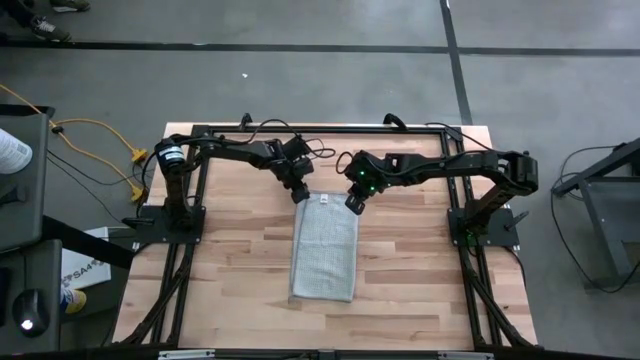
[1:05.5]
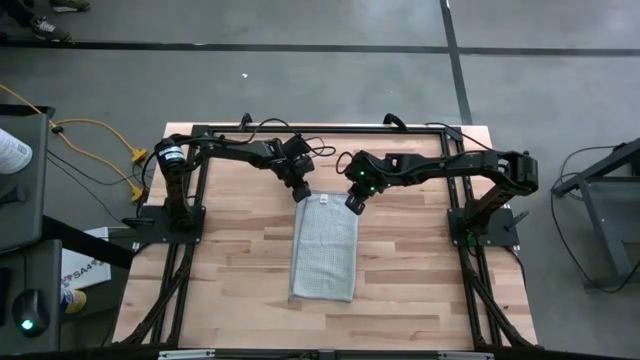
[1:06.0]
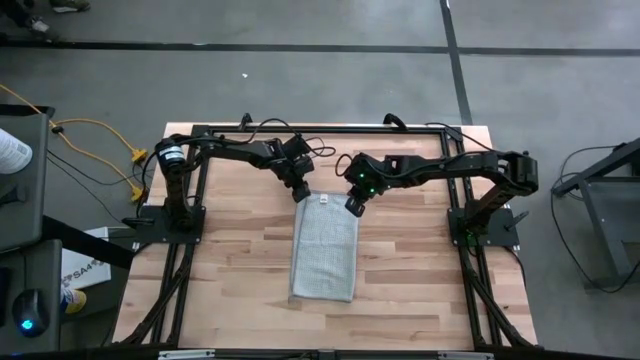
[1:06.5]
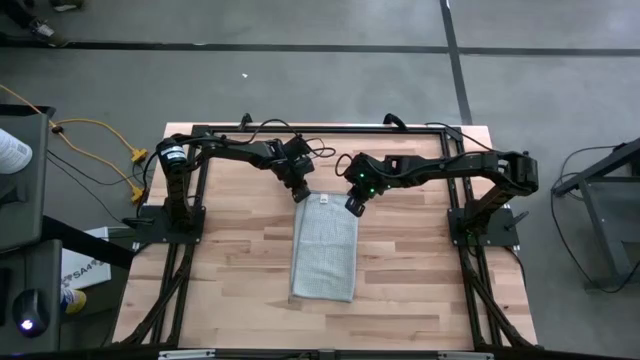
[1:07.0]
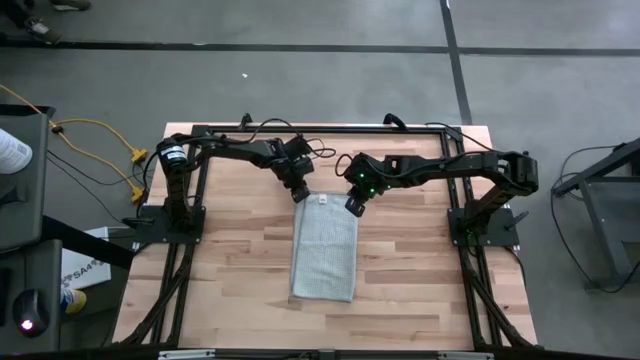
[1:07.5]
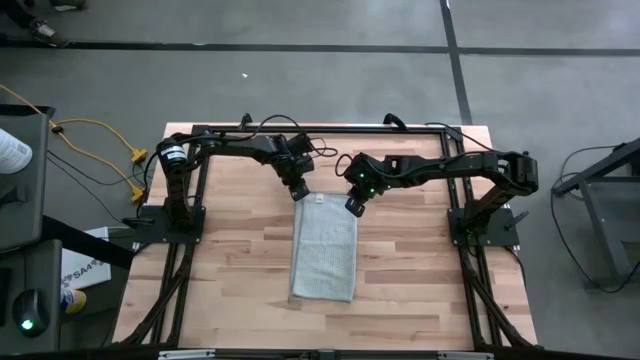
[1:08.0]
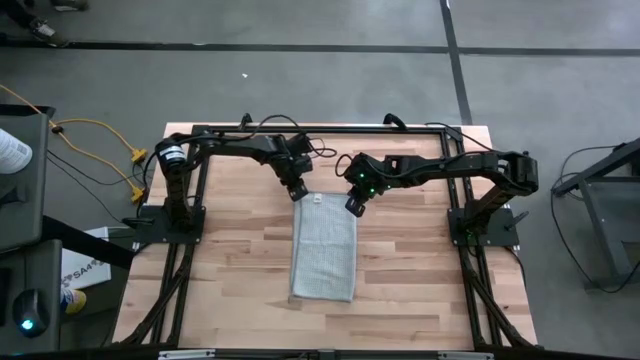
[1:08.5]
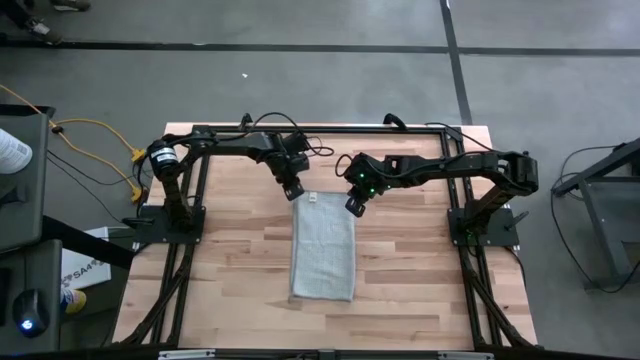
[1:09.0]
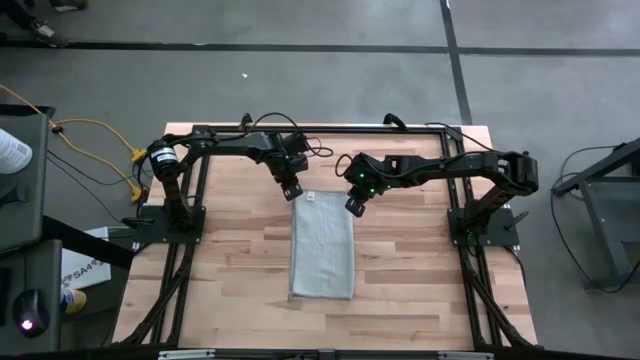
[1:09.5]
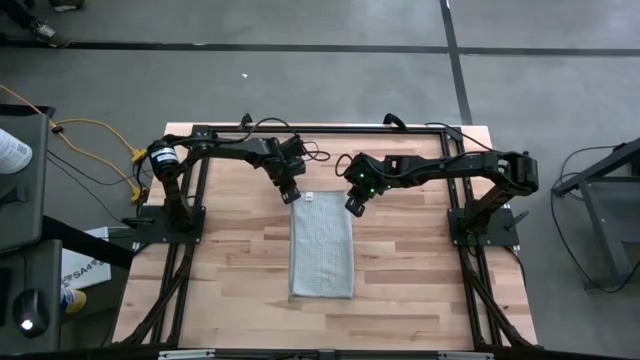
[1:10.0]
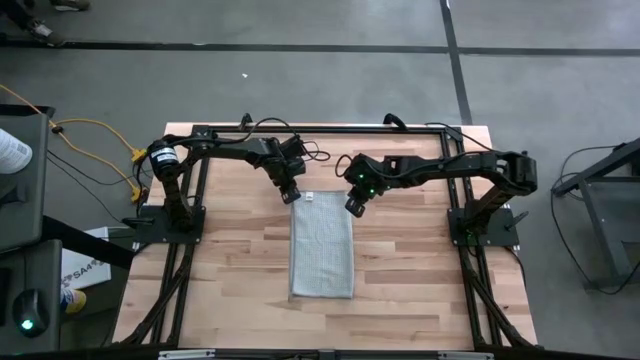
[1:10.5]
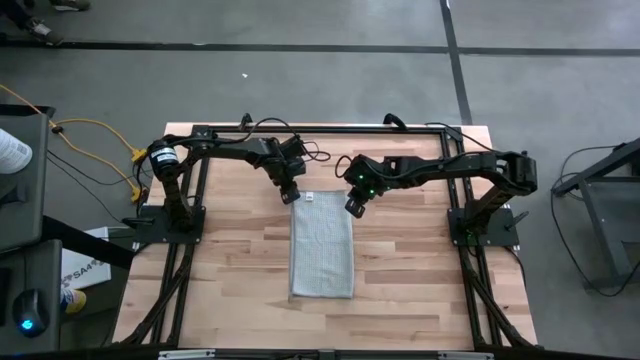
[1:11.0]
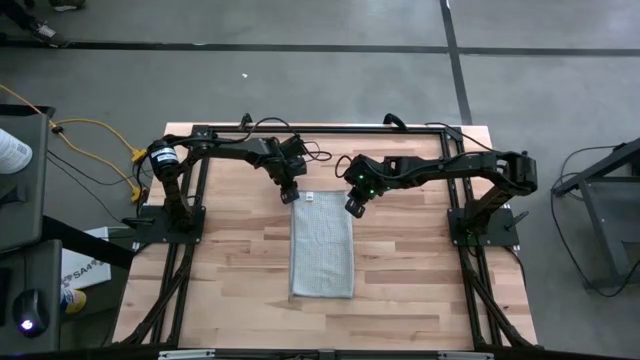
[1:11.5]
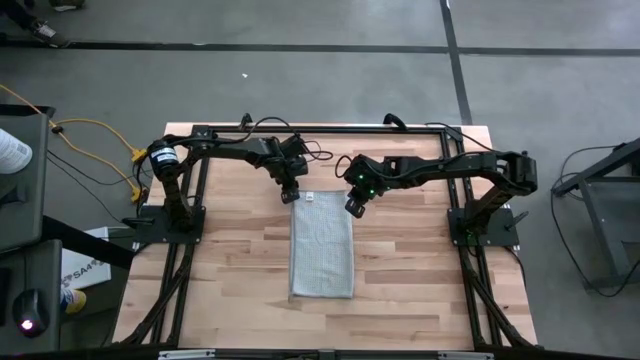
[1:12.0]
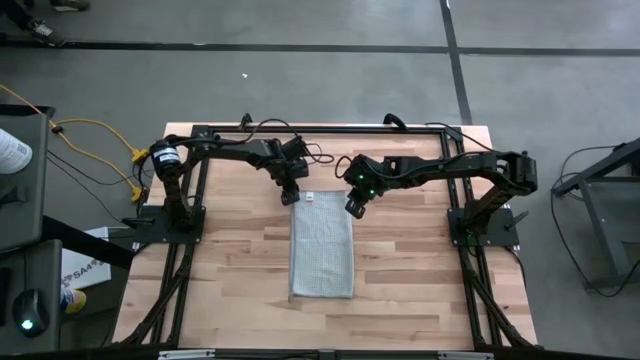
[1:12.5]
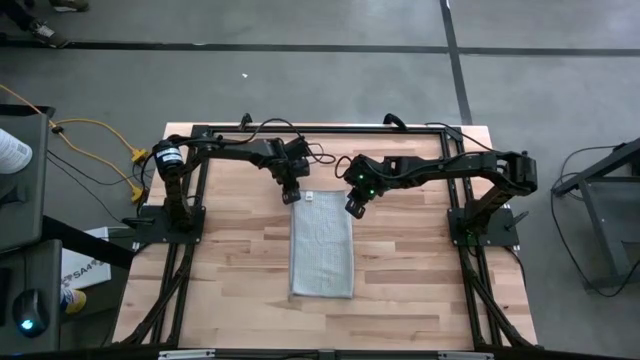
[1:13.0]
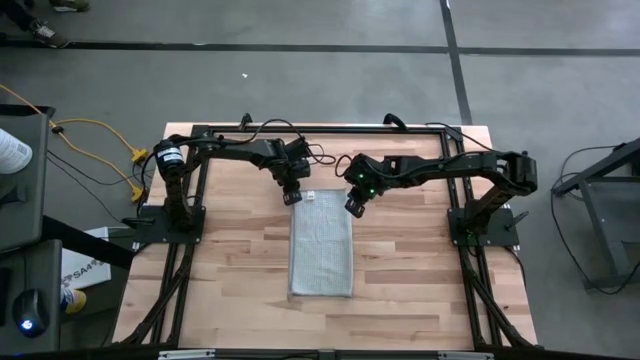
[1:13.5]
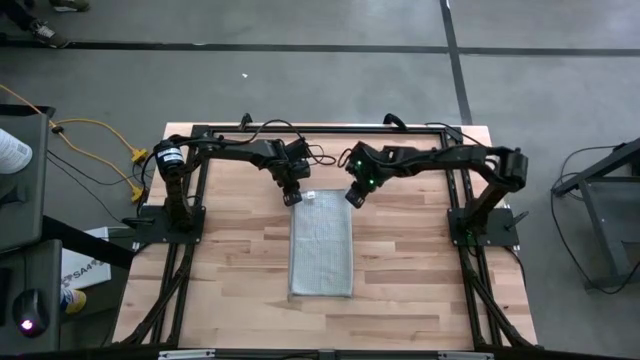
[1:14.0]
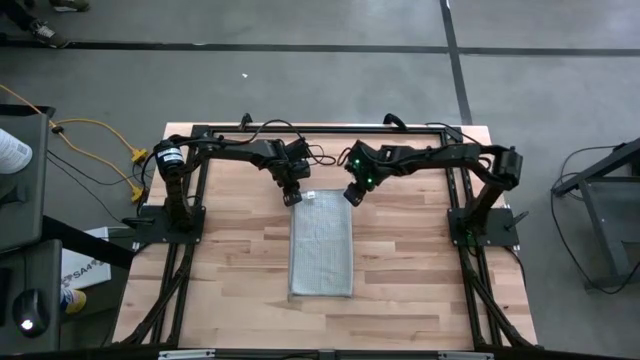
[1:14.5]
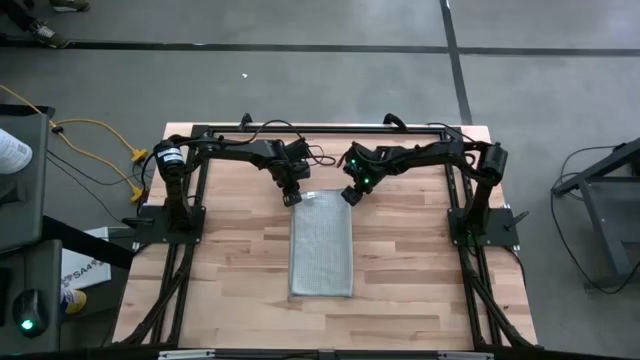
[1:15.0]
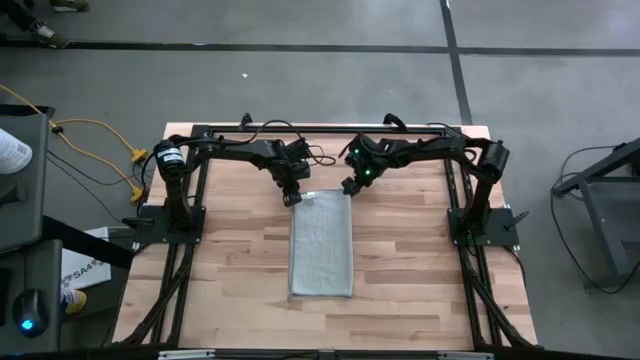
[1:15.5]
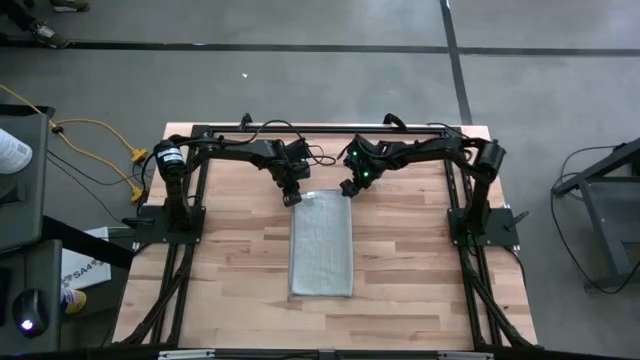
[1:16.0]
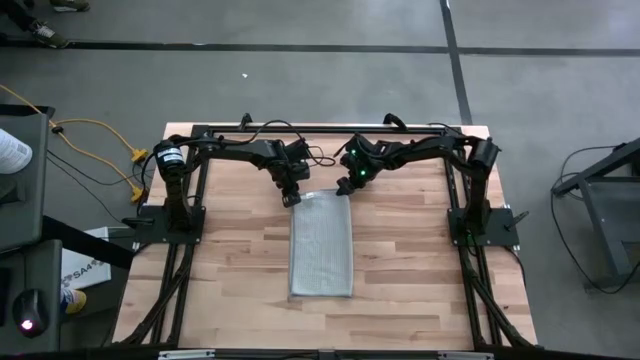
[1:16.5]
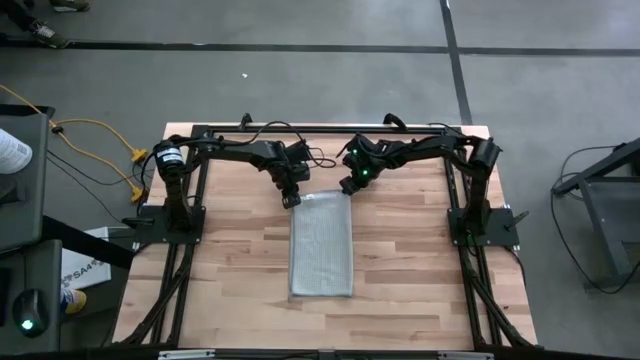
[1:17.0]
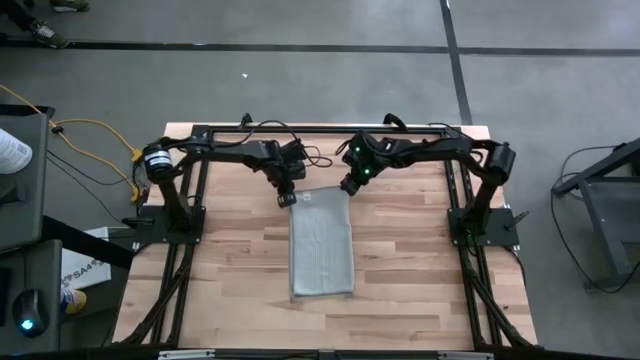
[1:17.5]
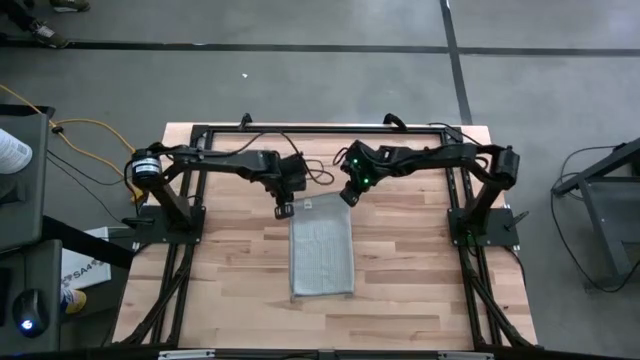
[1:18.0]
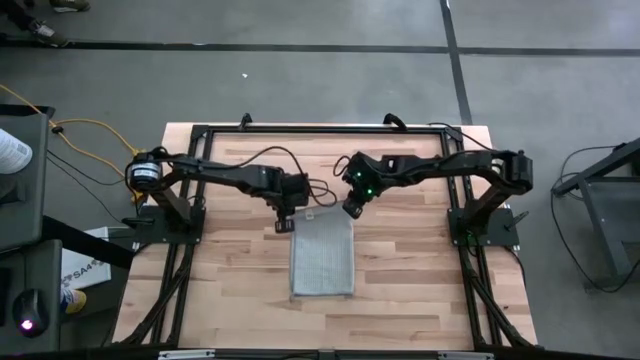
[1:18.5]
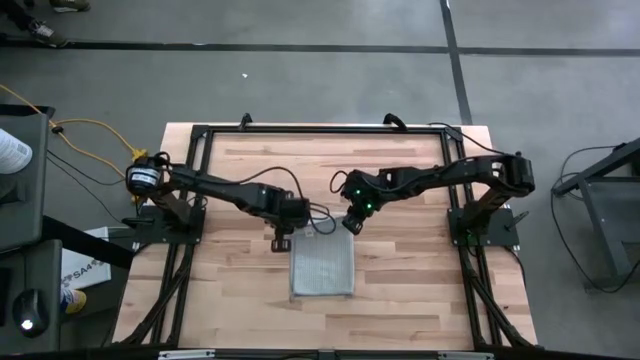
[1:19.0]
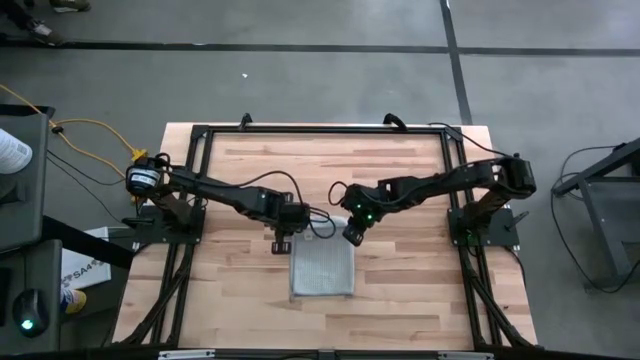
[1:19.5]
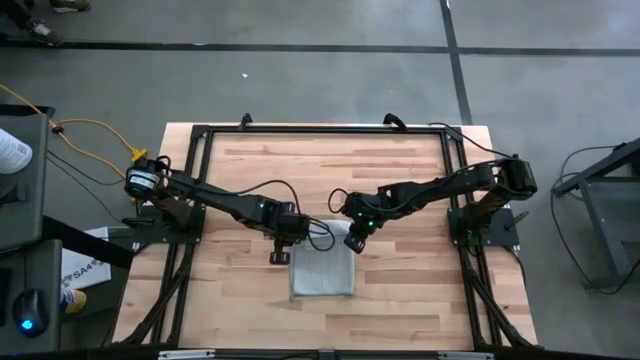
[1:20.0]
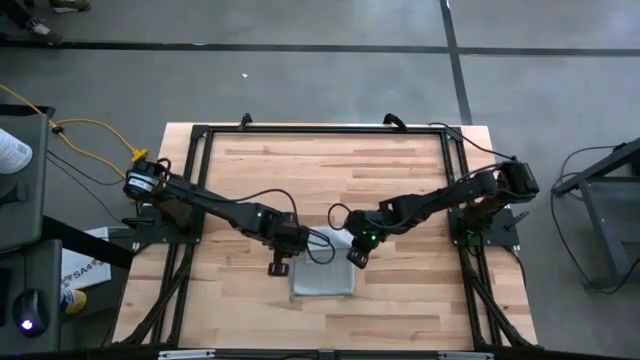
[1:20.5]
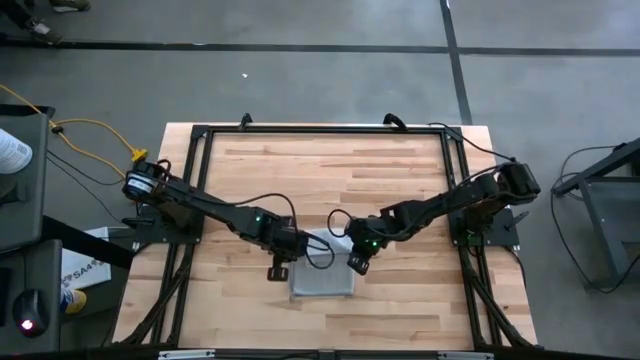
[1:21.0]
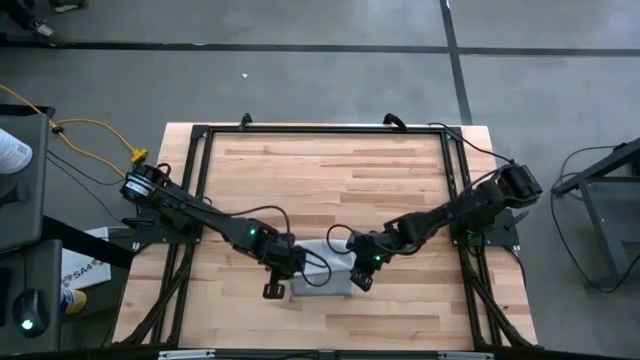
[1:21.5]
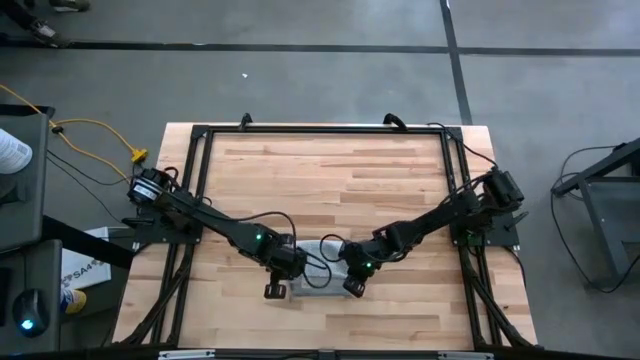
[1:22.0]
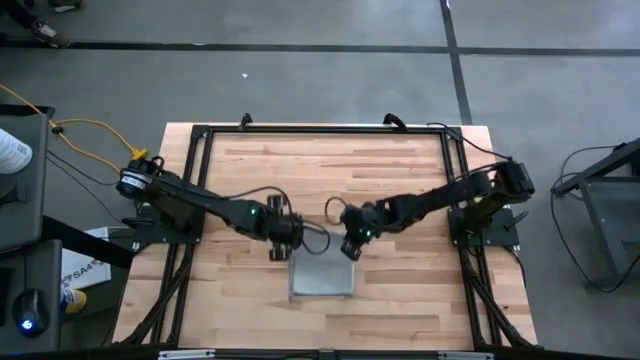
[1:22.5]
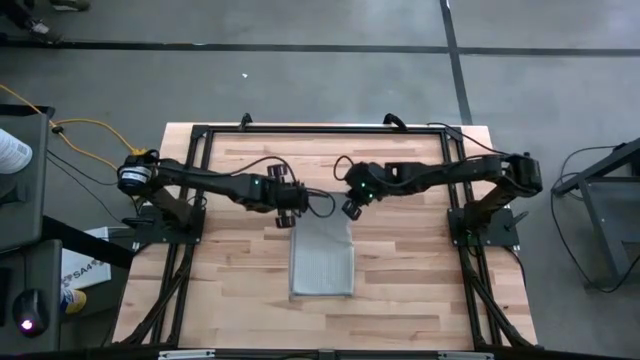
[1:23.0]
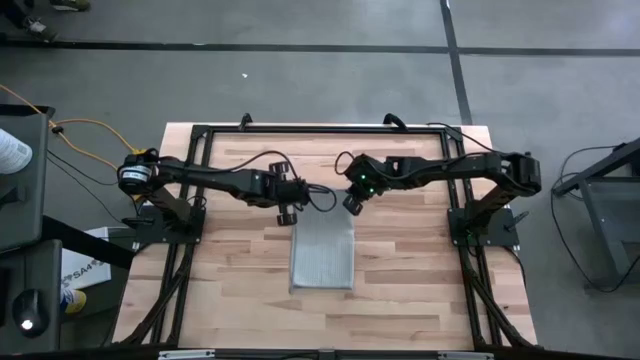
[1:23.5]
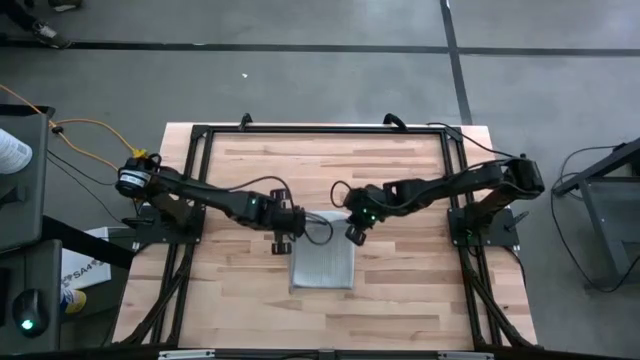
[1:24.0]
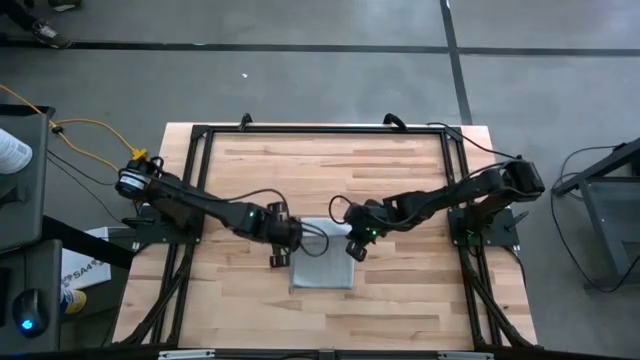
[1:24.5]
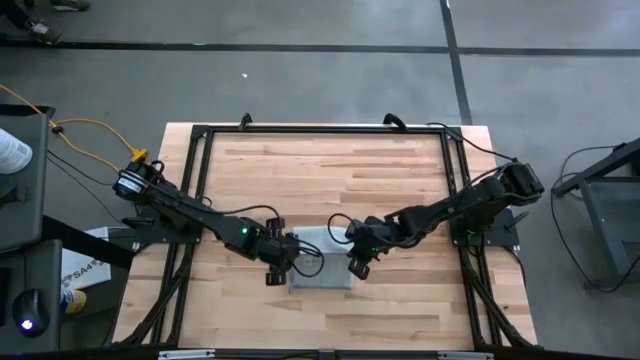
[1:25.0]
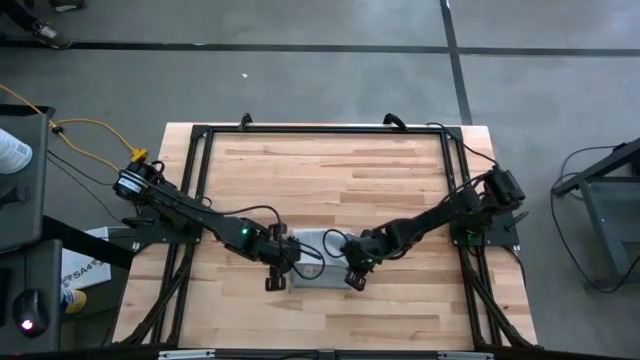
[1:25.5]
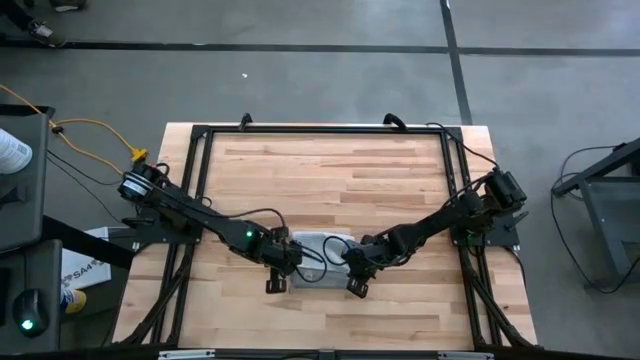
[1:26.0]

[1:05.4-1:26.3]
Task: Fold microfiber towels
Fold the gray towel
